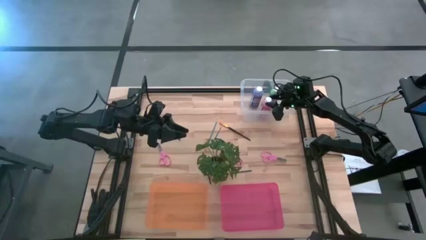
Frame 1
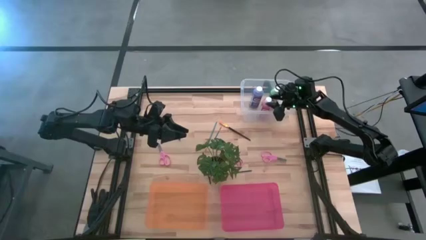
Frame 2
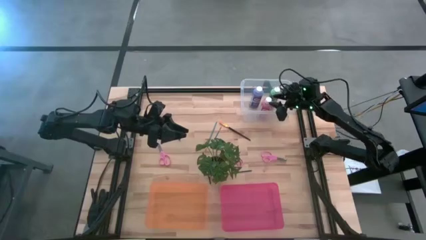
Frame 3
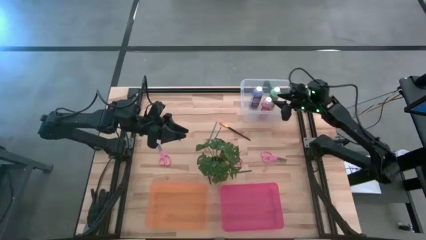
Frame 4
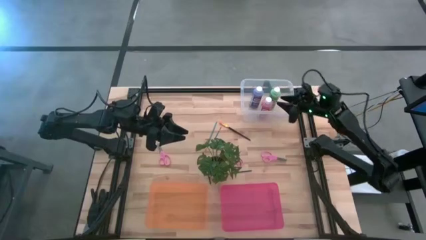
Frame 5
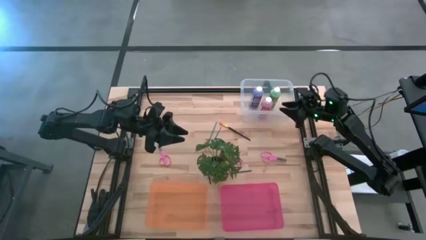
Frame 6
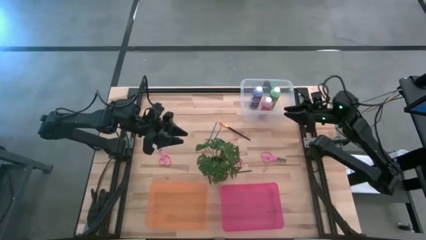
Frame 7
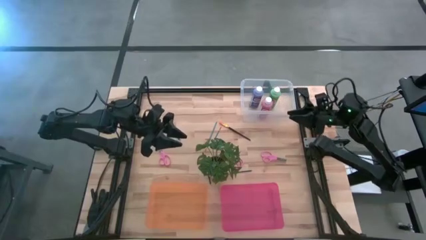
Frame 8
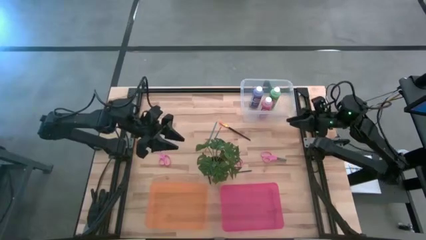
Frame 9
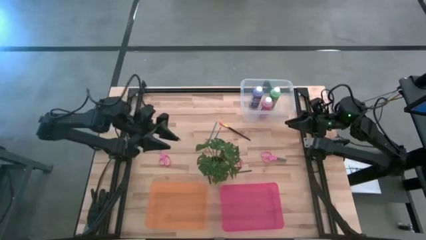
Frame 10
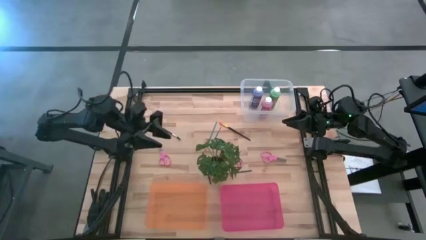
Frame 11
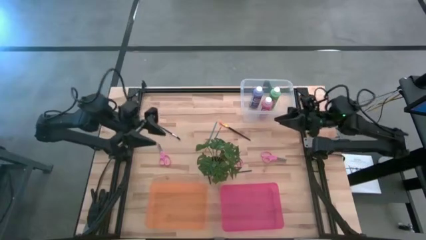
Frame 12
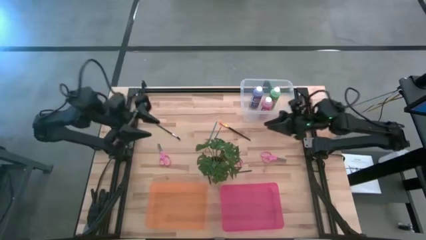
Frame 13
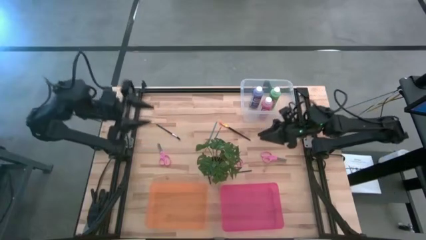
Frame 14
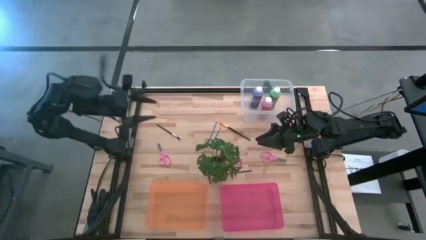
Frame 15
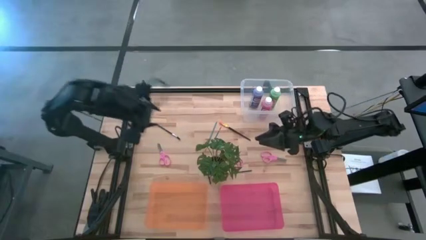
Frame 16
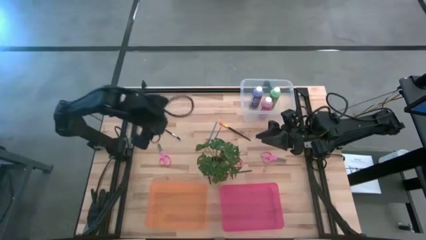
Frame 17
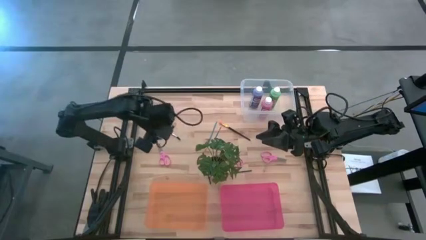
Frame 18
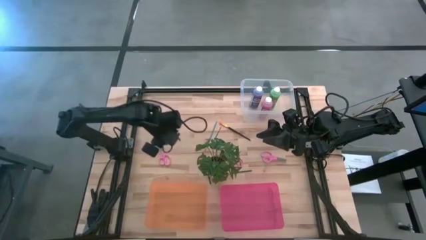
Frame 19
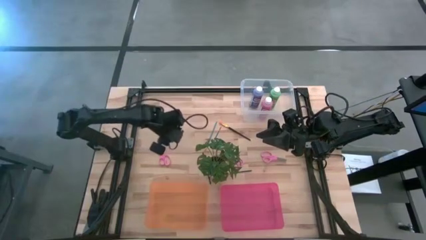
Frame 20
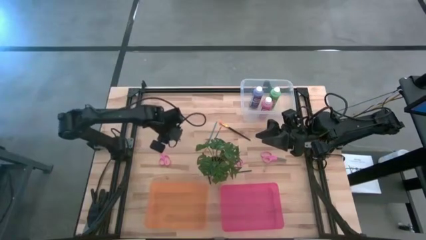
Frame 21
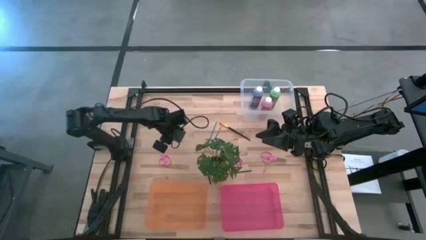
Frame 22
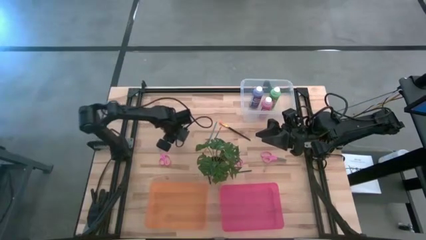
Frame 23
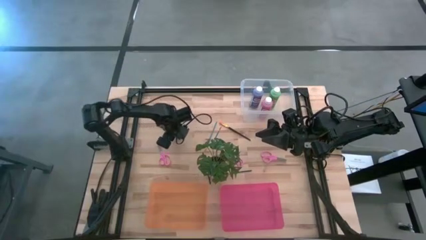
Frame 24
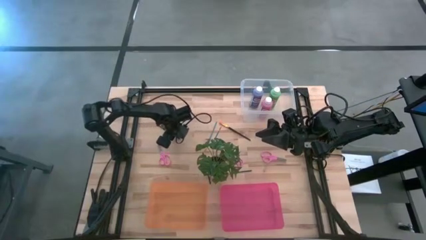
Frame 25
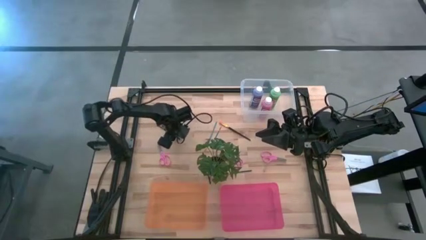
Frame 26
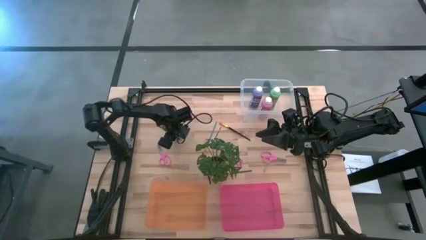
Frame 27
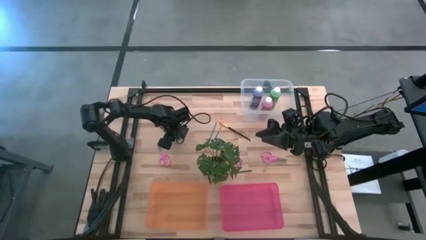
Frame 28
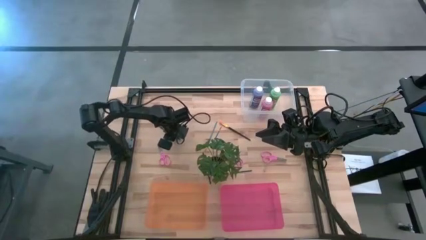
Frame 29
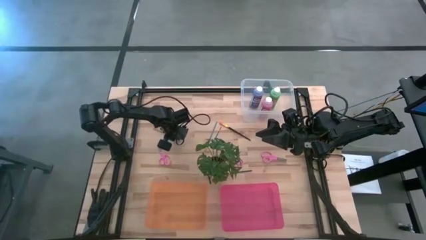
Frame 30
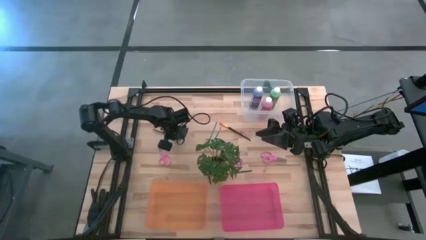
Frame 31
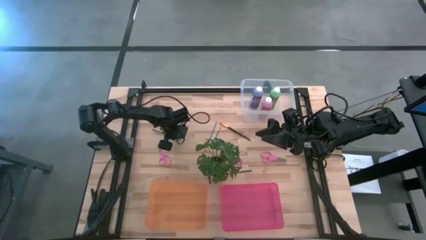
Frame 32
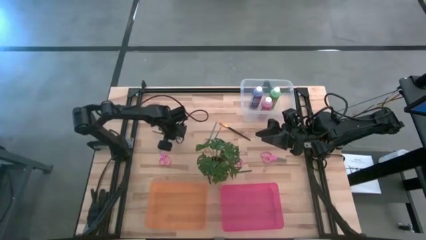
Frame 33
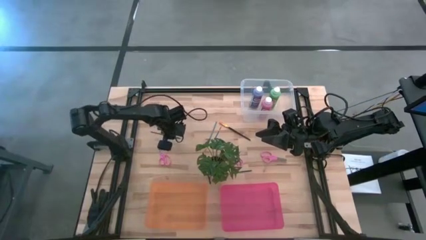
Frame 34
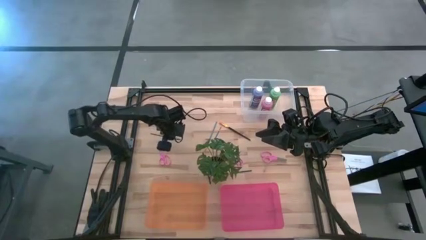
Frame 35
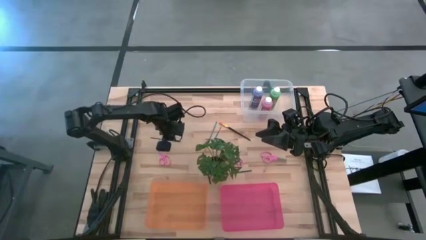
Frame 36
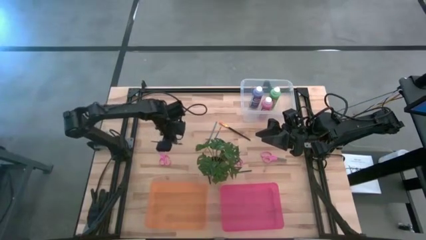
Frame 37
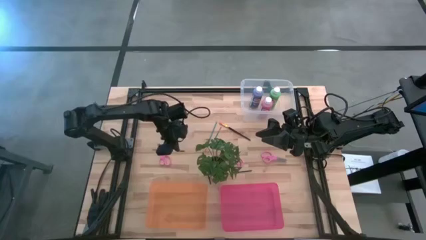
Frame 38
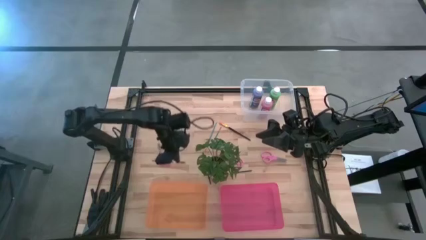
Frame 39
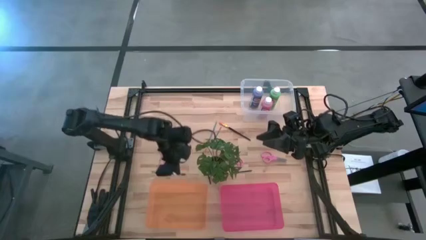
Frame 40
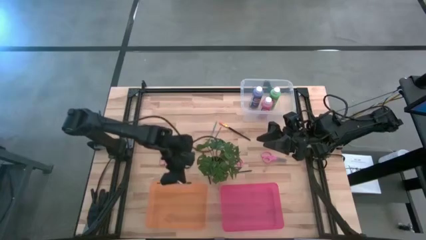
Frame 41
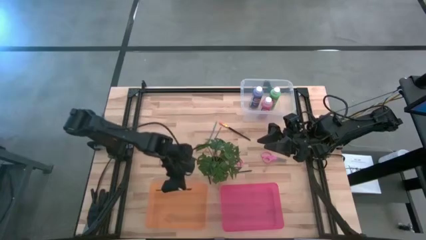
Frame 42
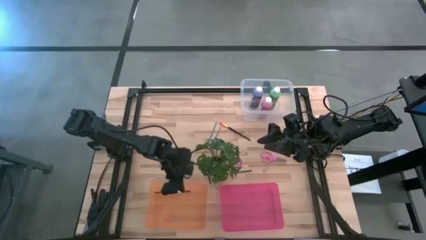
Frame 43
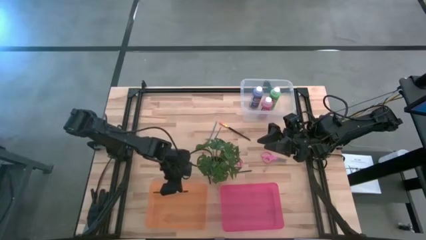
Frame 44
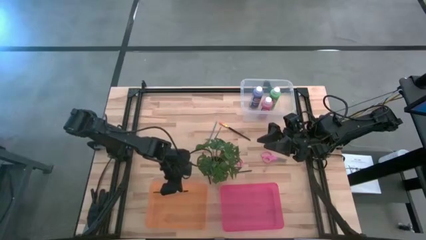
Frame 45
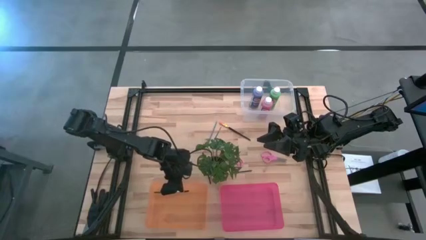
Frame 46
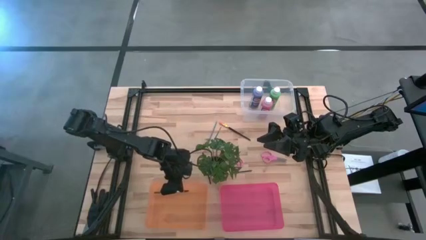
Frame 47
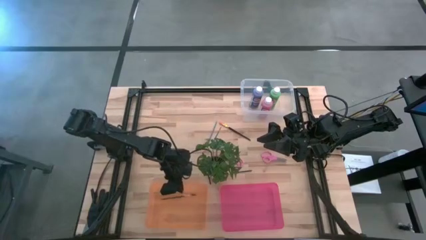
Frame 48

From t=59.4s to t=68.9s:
Task: Pick & Place Paint Supplies
Put the top black lash brush into the orange bin

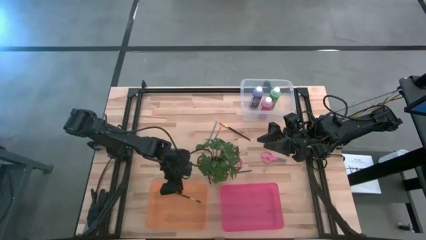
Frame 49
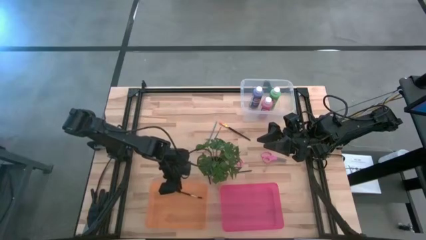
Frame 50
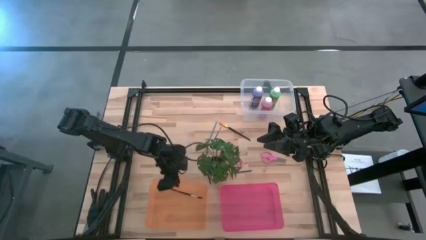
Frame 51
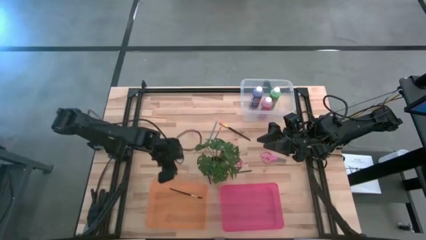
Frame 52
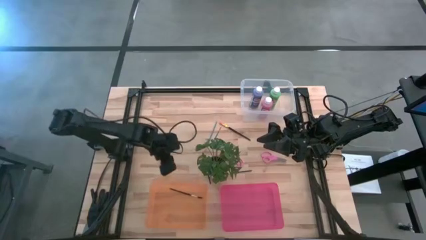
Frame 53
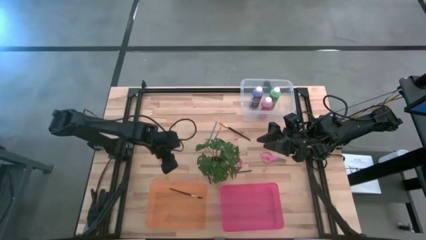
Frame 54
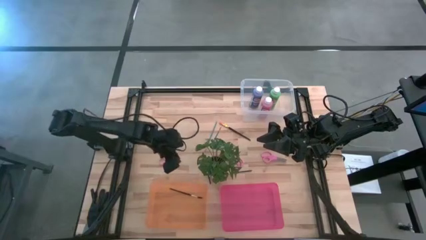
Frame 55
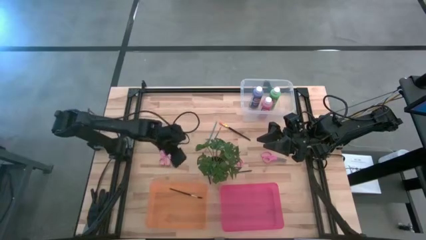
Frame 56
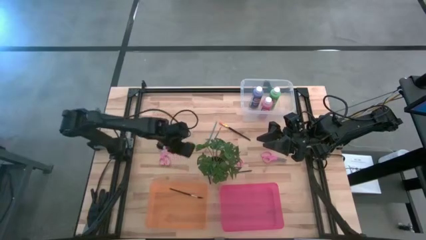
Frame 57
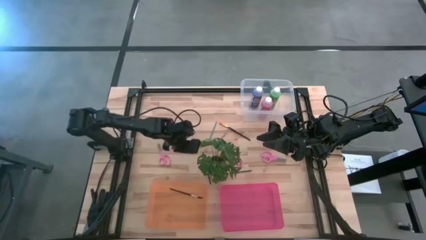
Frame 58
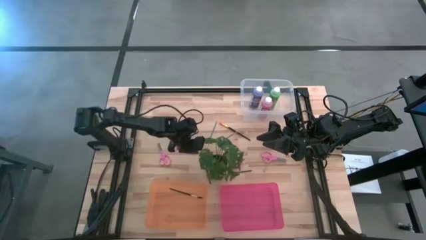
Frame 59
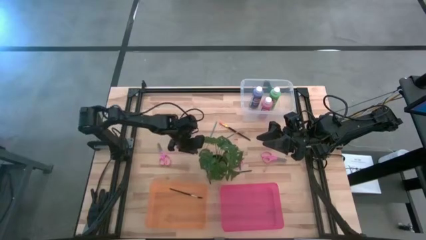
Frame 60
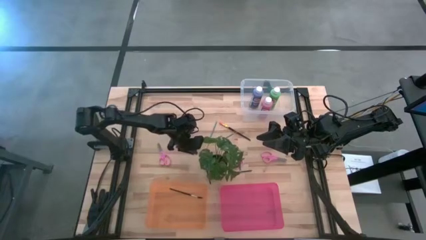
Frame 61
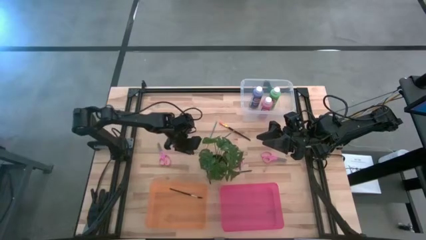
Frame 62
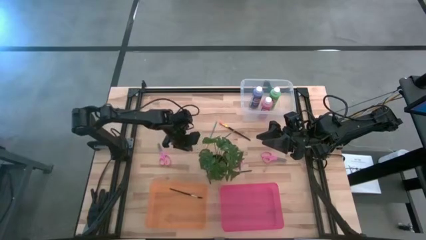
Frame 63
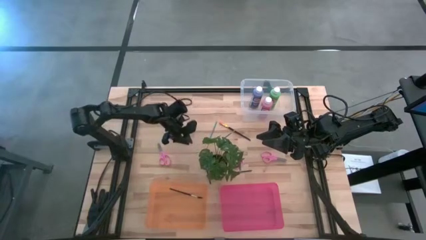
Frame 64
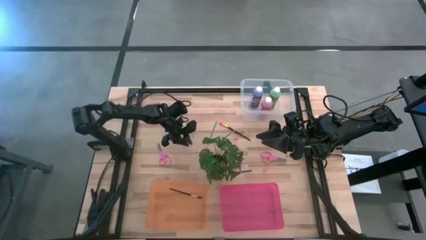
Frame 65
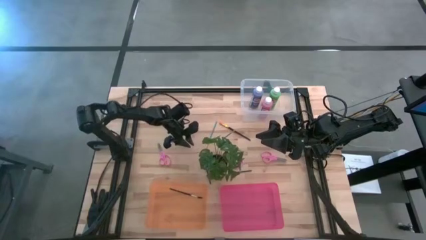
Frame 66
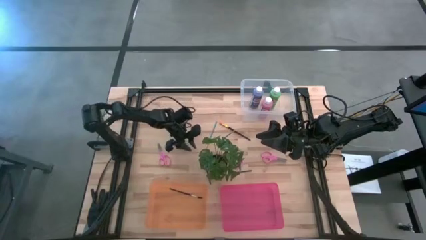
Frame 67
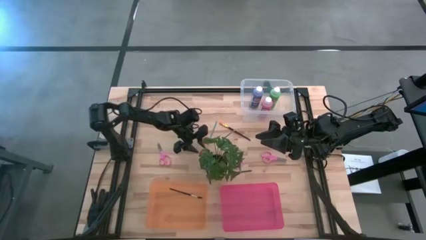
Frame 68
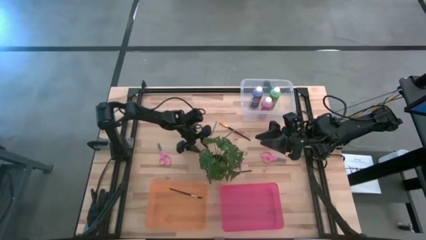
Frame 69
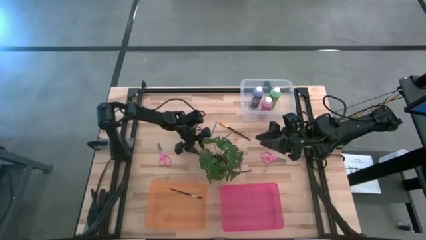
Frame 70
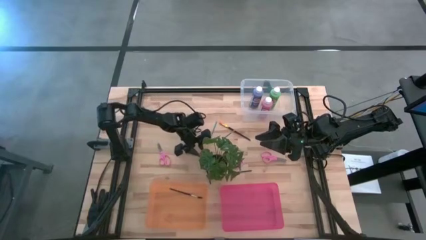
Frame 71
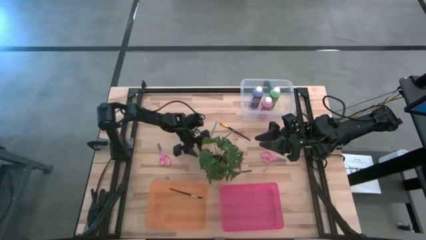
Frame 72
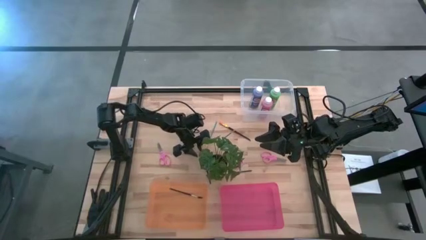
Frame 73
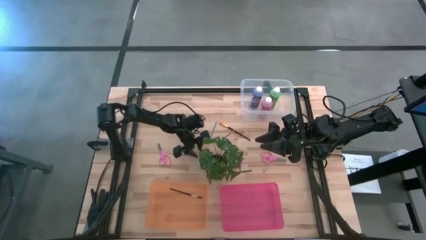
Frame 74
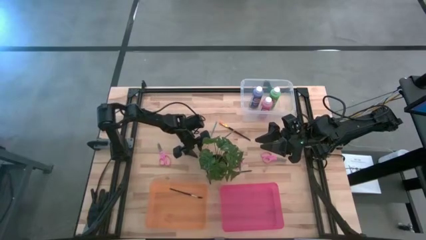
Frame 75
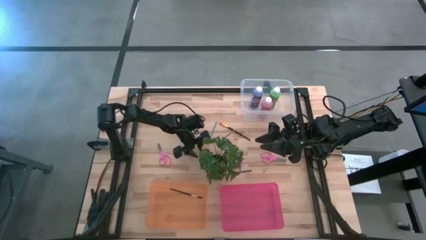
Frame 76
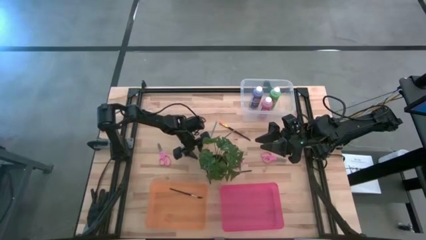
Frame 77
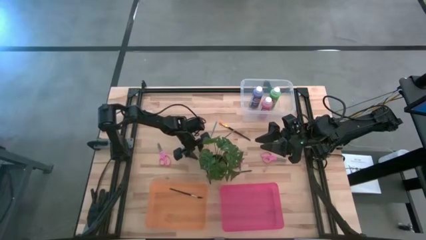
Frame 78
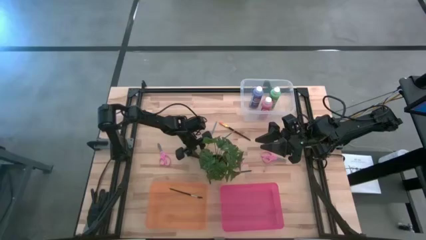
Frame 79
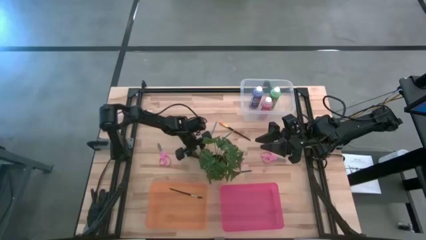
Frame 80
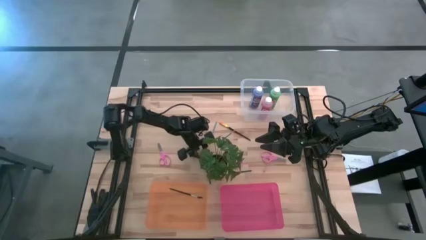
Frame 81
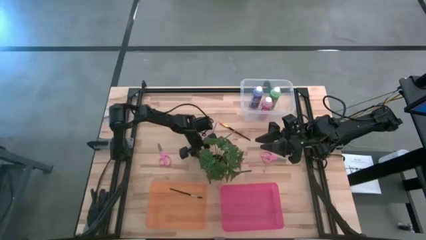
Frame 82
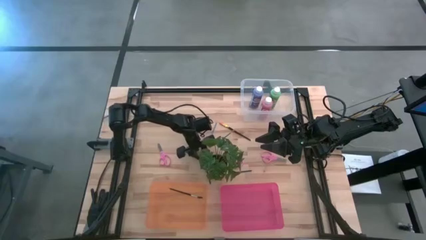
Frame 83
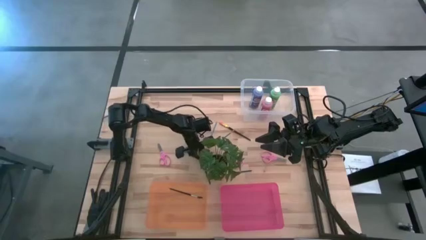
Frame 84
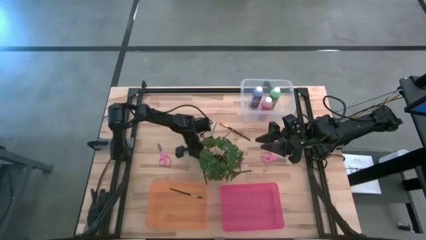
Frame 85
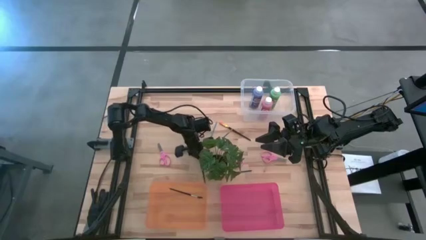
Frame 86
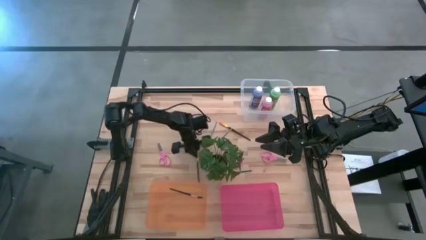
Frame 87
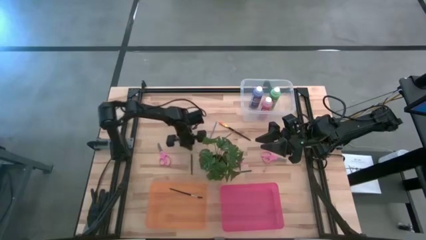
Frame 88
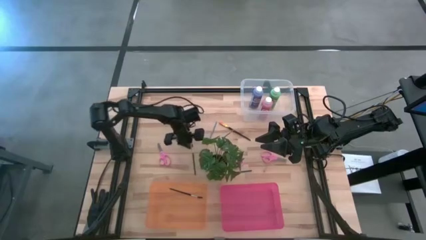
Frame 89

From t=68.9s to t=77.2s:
Put the black lash brush into the orange bin
